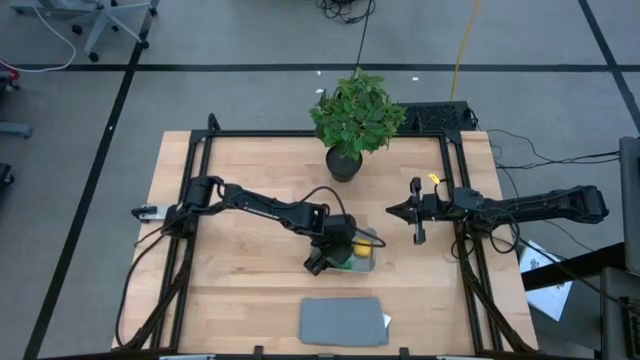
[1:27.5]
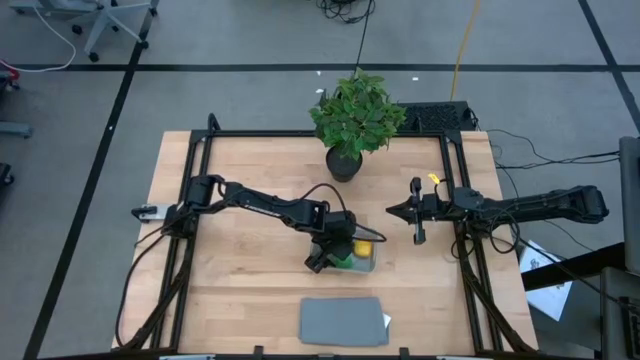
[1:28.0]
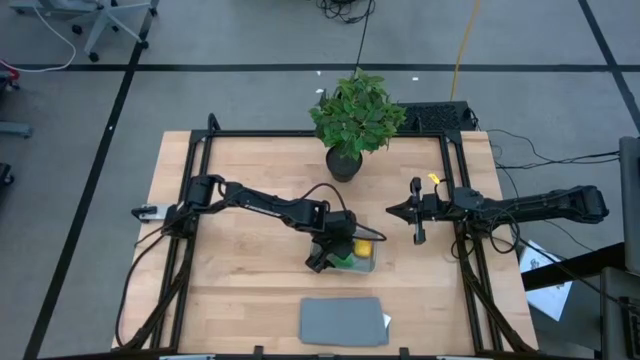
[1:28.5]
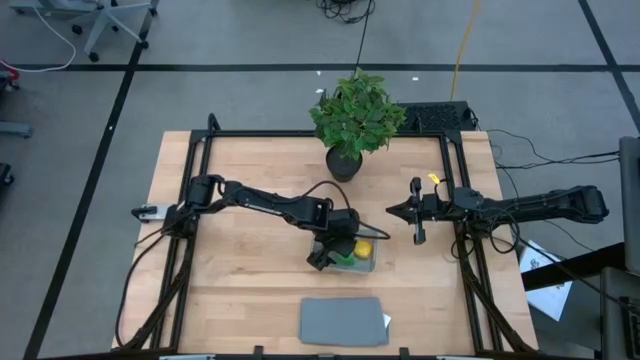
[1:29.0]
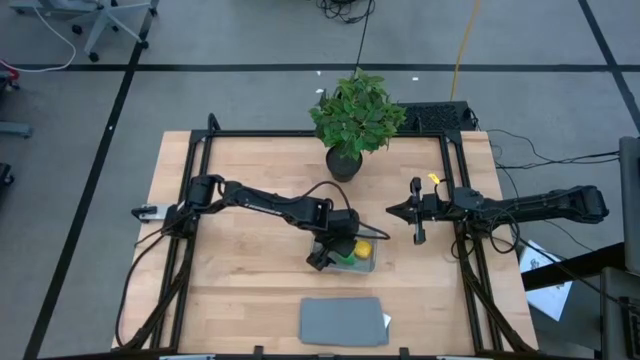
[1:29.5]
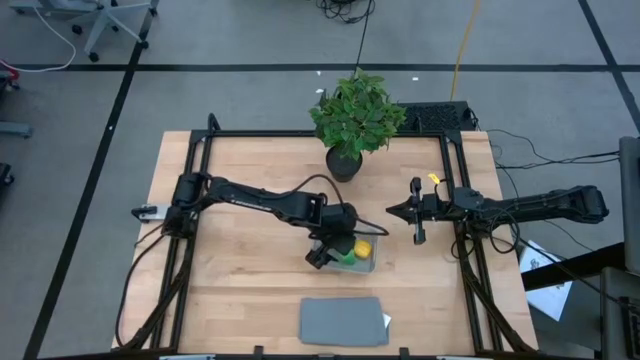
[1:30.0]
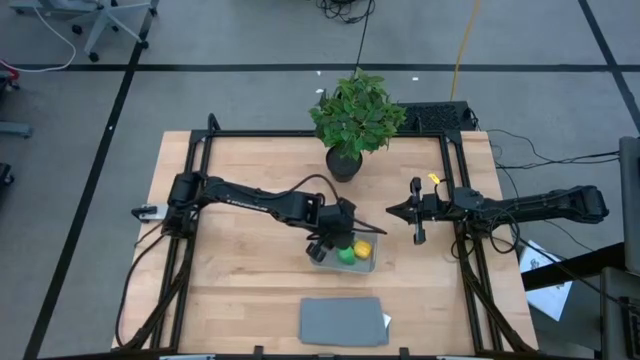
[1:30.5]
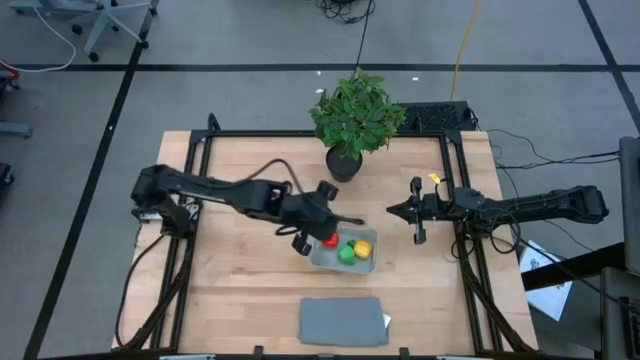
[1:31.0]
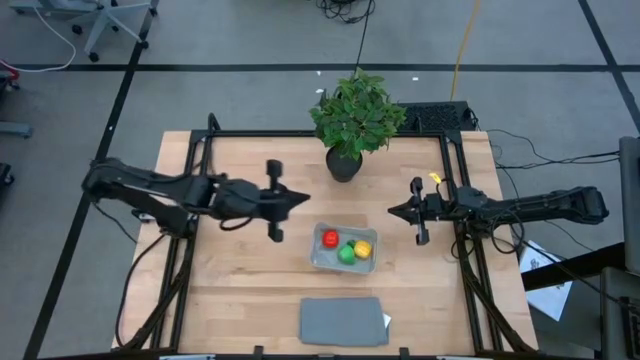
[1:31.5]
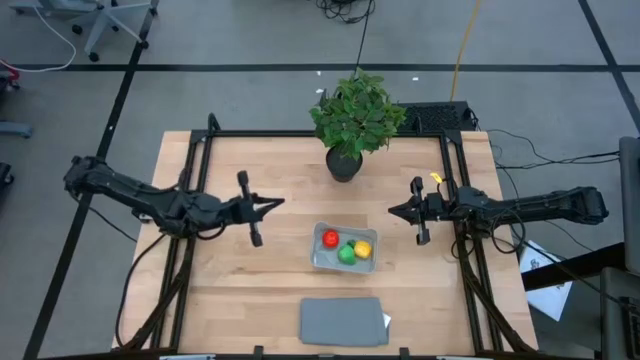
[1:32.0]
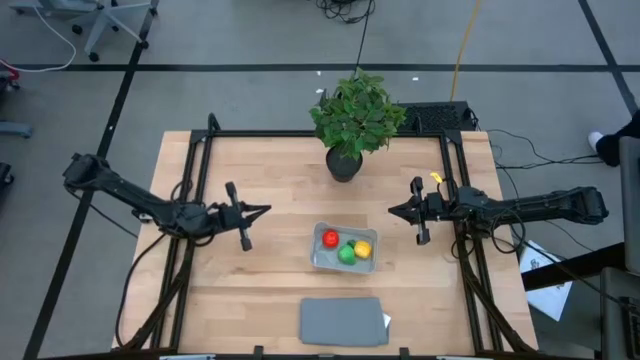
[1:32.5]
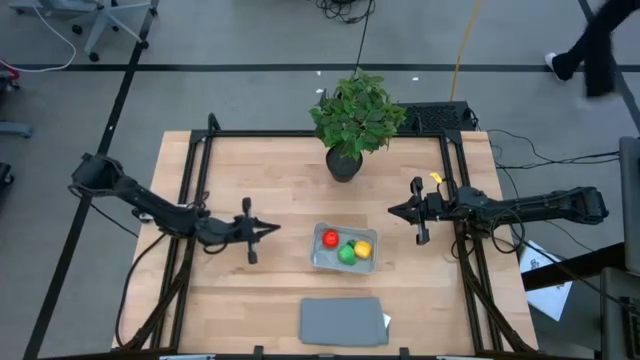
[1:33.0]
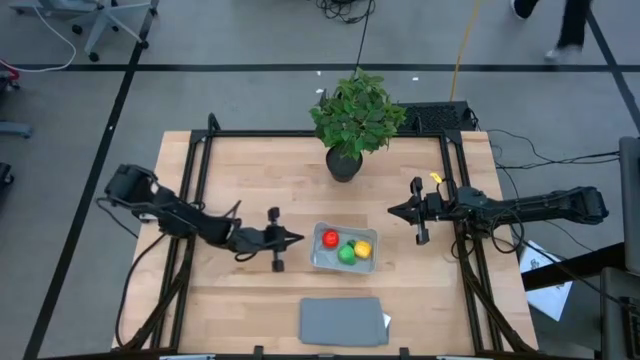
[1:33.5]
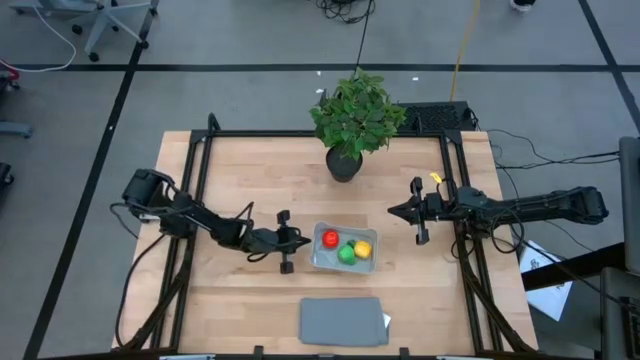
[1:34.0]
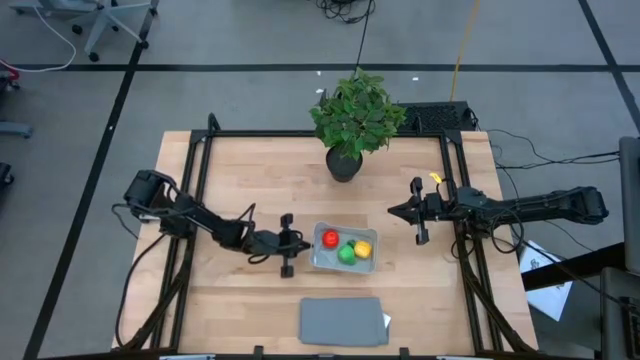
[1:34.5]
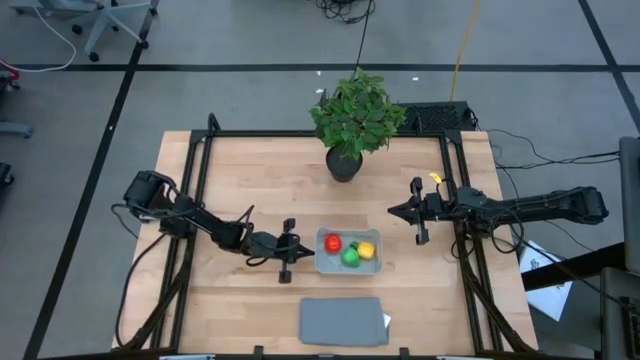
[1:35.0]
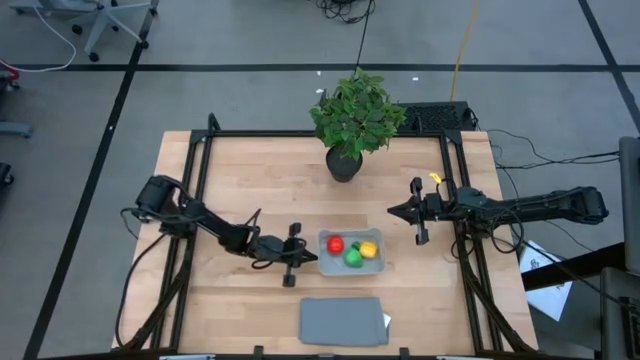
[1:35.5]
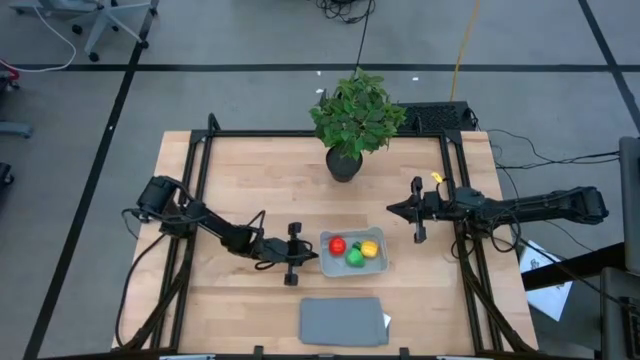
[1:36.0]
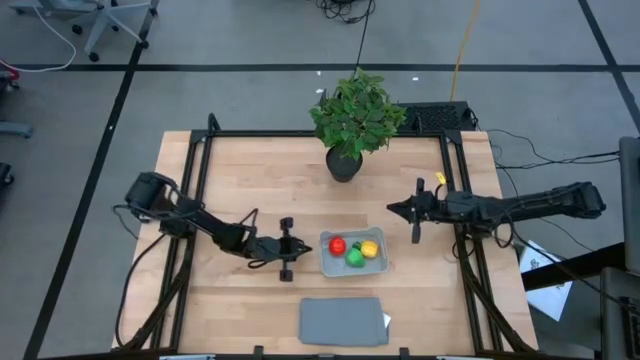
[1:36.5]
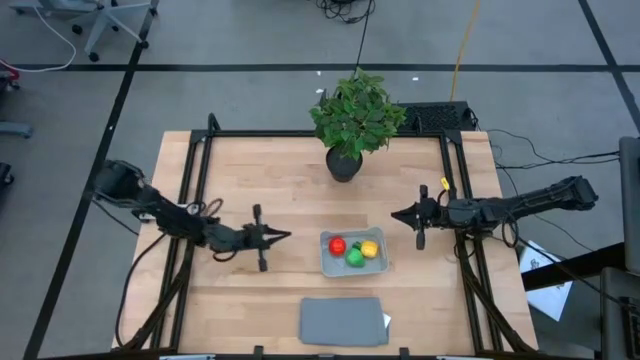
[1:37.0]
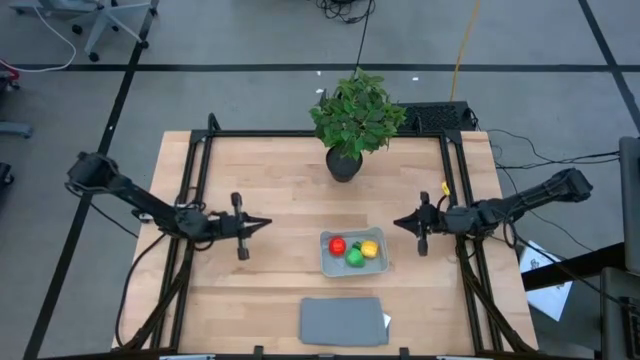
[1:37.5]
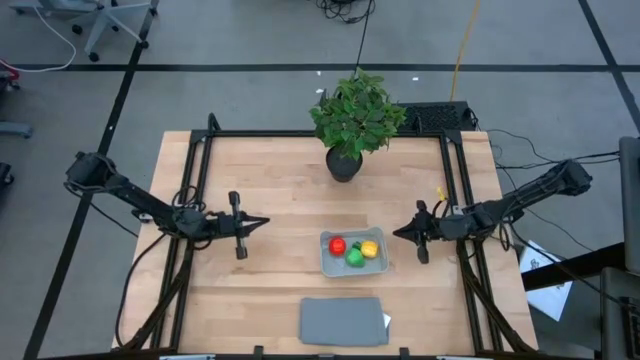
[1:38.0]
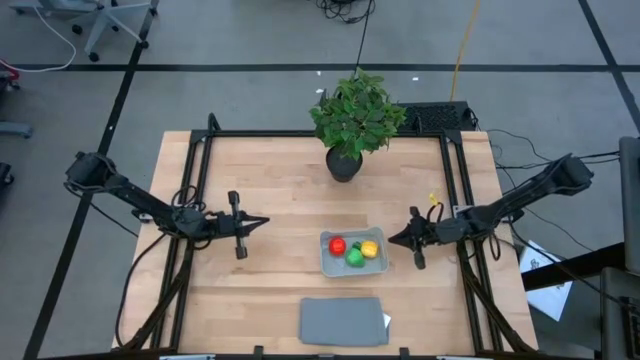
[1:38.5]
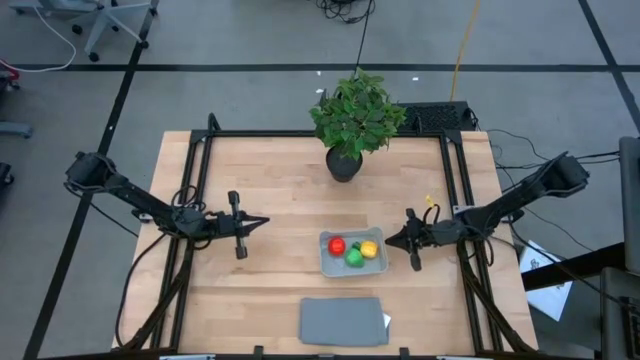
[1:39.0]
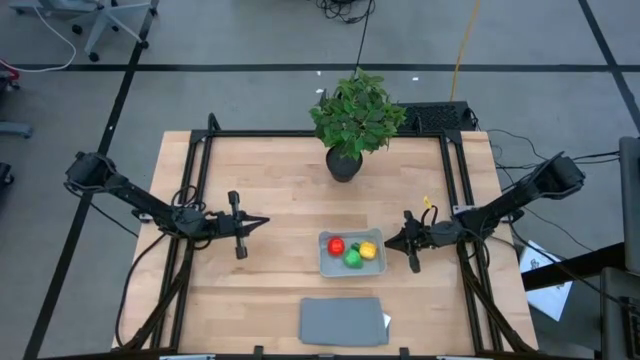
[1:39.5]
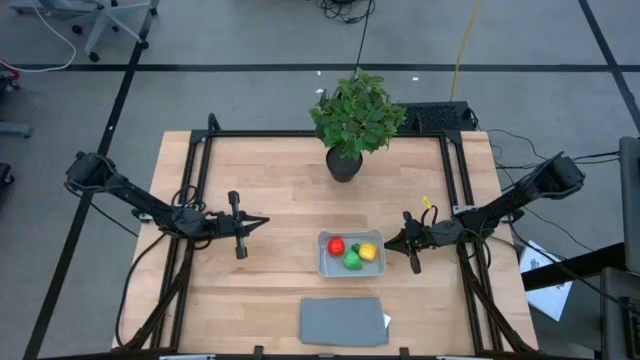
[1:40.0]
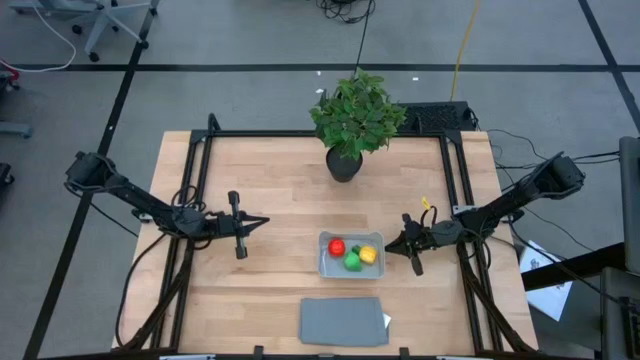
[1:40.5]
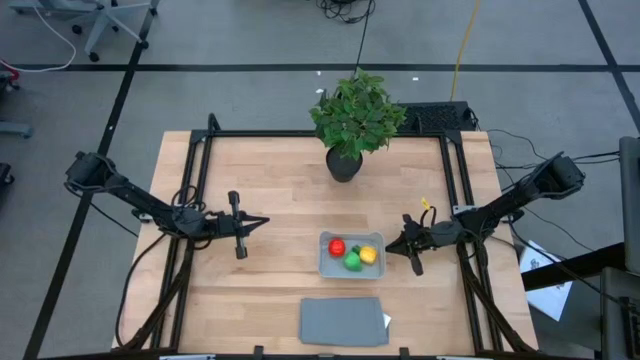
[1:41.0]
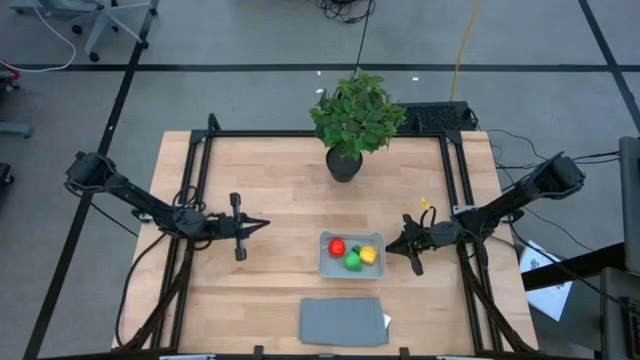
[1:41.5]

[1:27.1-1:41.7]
Task: Pick and placing Produce into tupperware
Adjust the basket

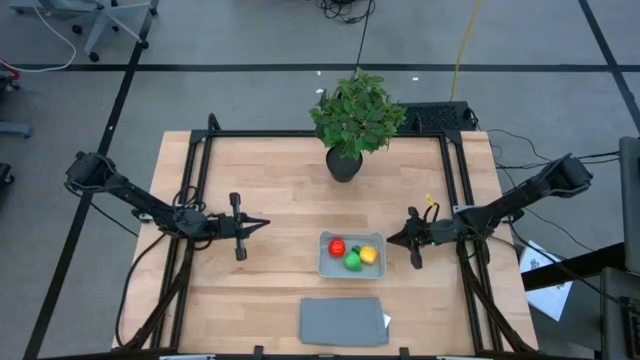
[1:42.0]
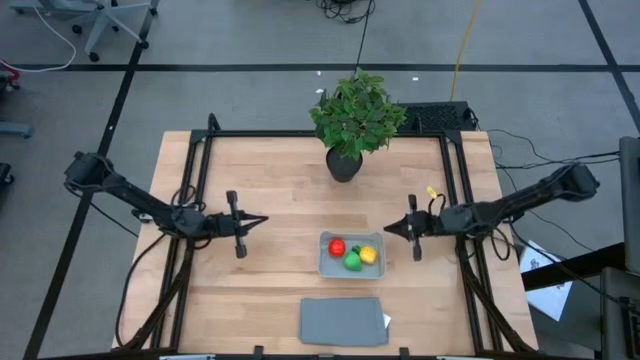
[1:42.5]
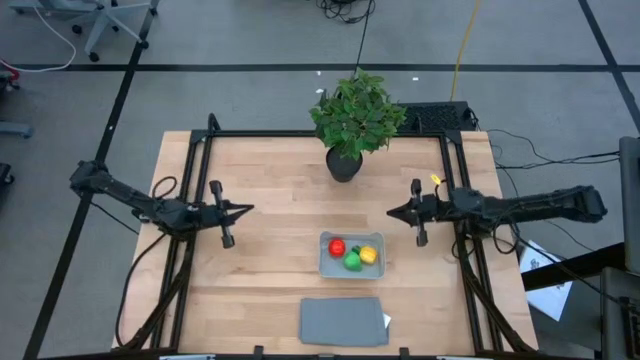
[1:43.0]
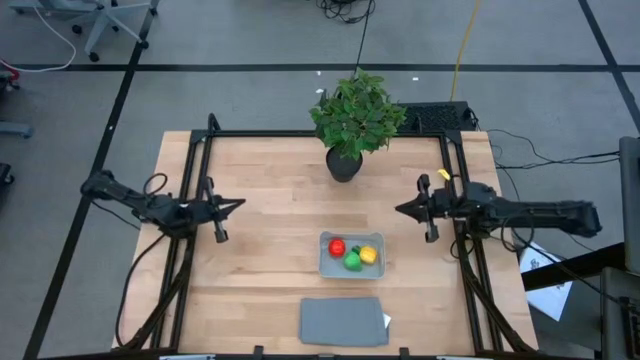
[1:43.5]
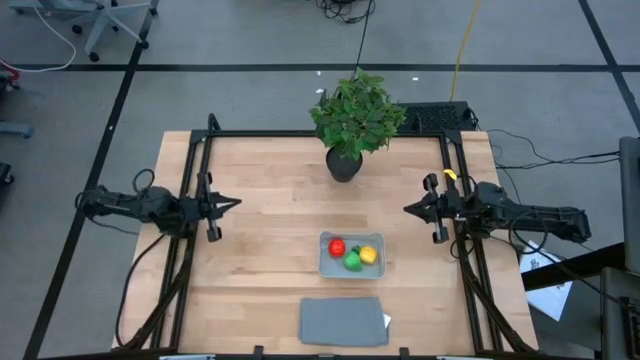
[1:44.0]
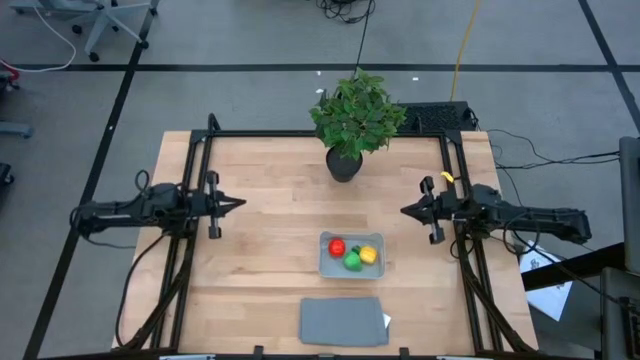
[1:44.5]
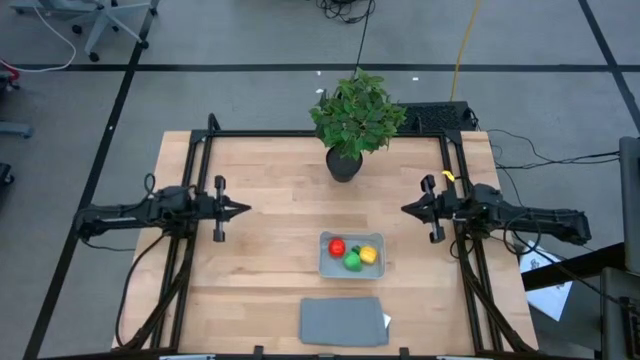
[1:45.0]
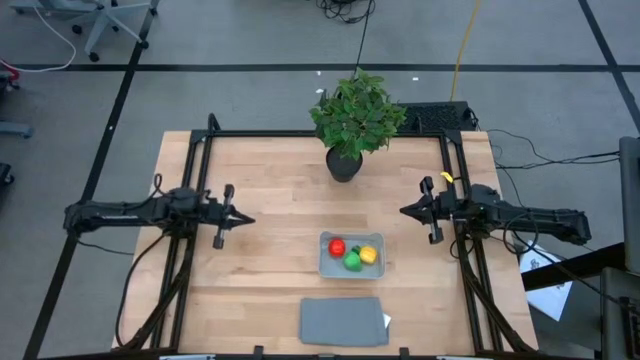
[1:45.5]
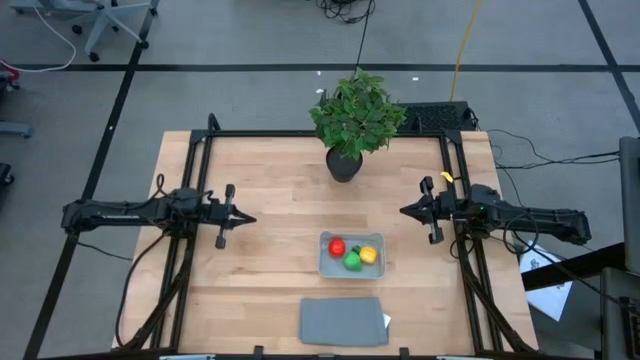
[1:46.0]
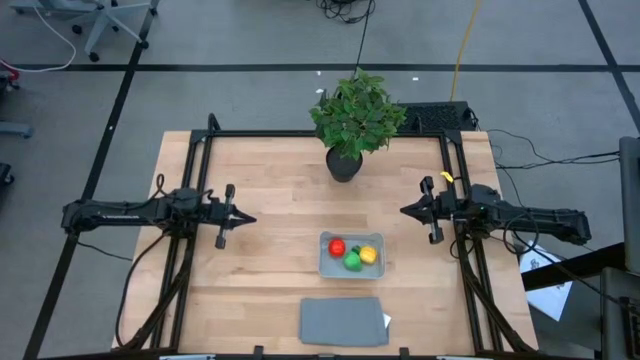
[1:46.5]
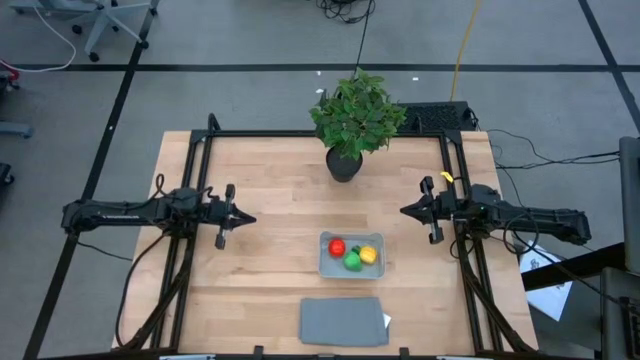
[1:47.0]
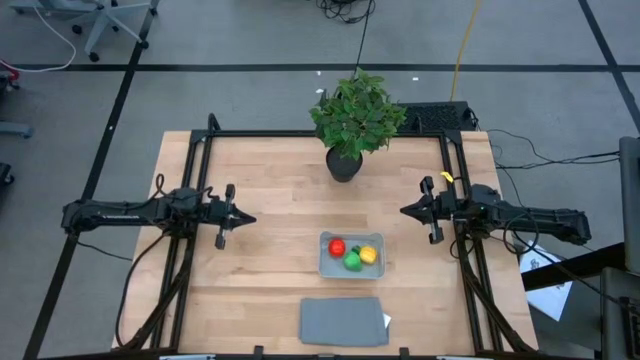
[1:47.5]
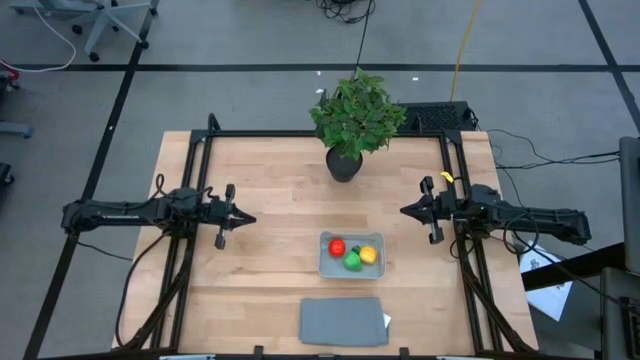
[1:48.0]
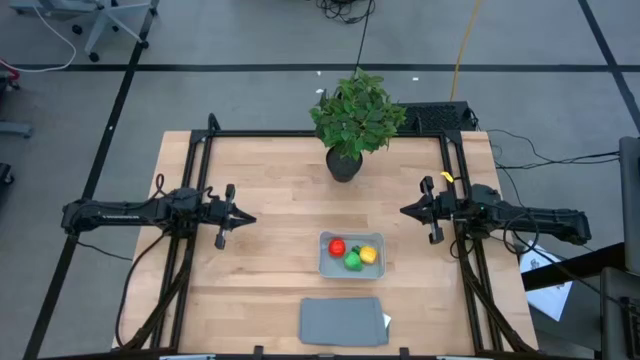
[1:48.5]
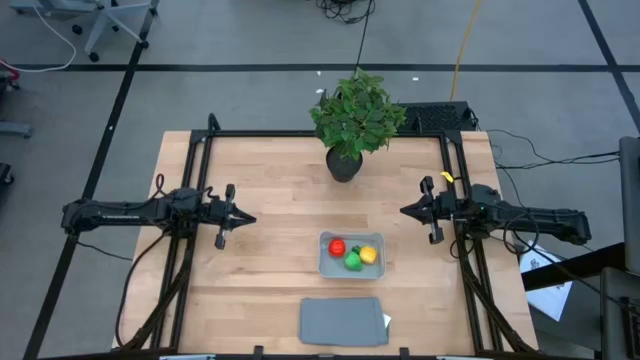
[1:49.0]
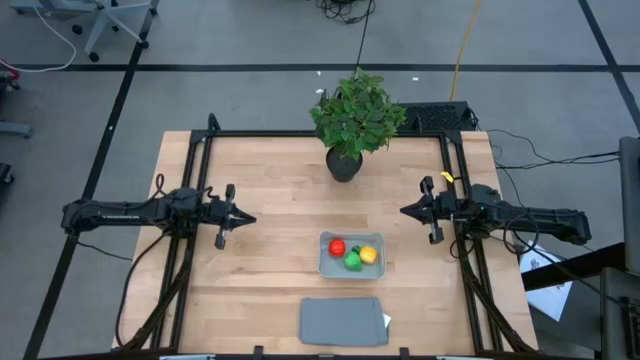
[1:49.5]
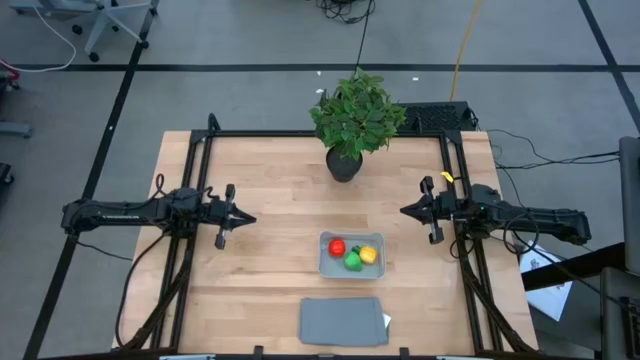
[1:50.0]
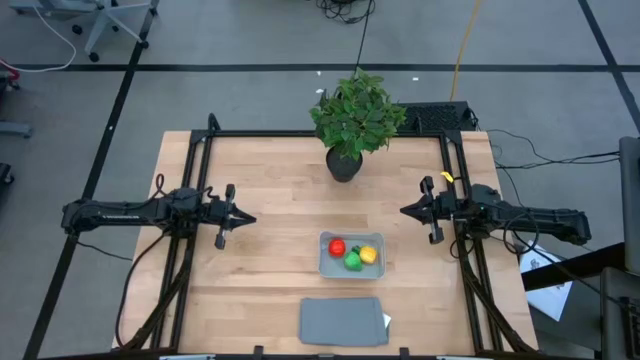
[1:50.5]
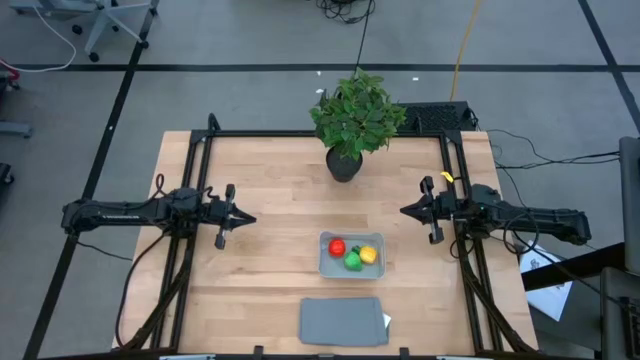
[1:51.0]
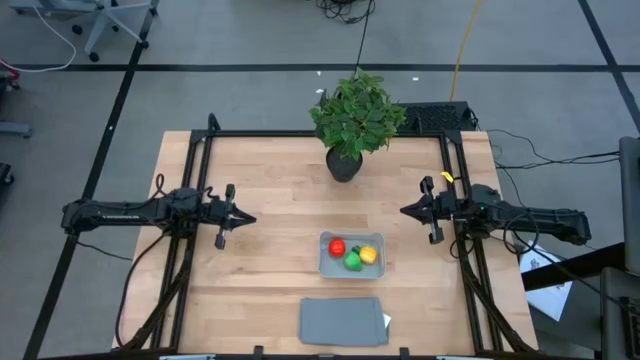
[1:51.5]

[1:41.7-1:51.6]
Return to Home Position
